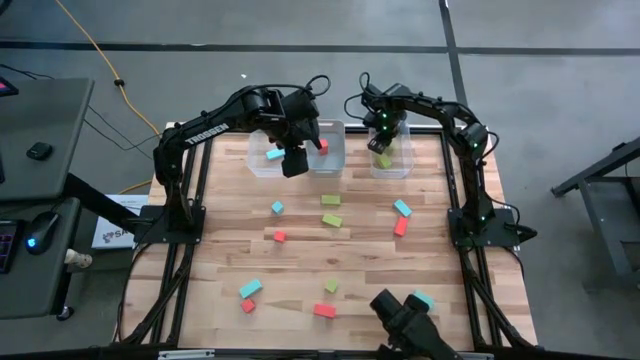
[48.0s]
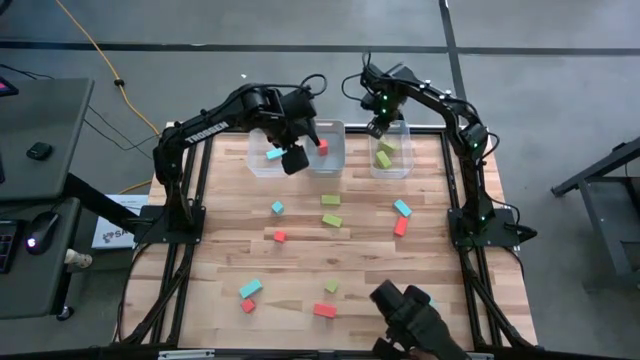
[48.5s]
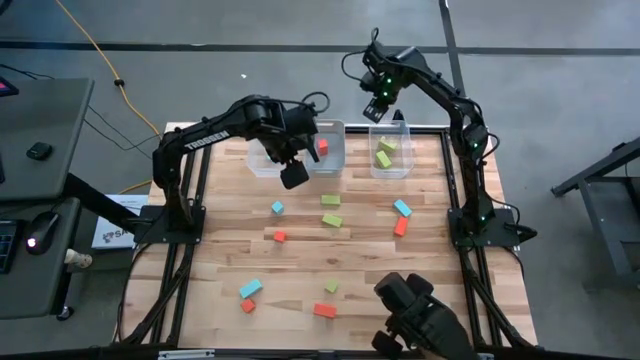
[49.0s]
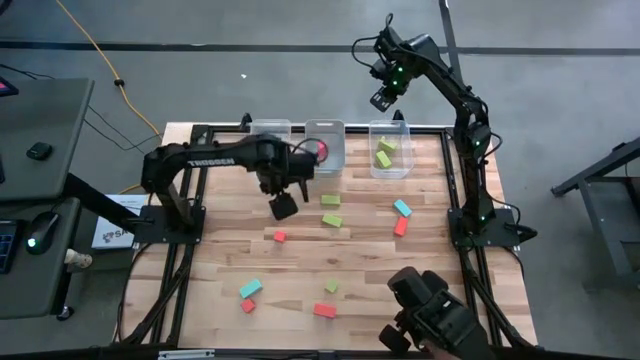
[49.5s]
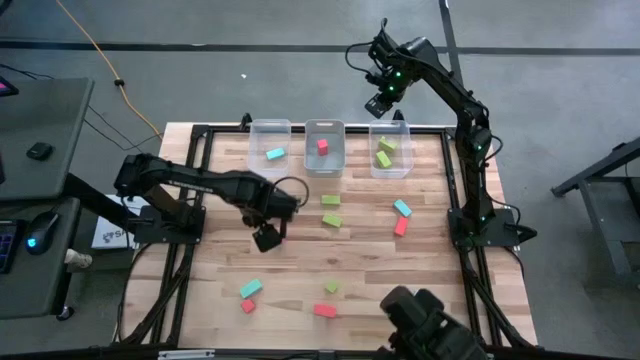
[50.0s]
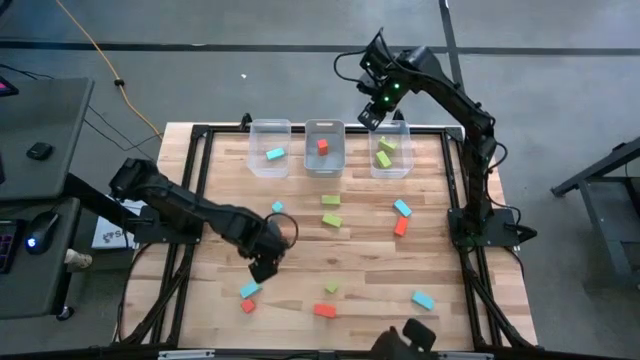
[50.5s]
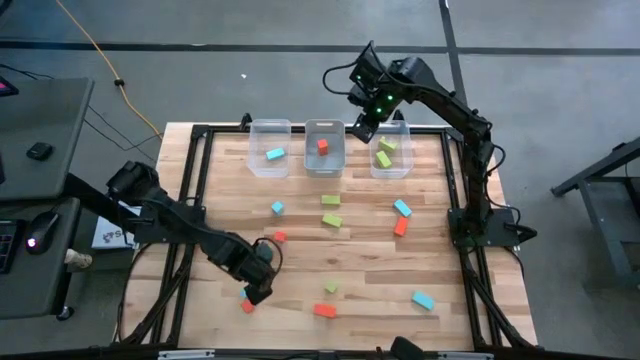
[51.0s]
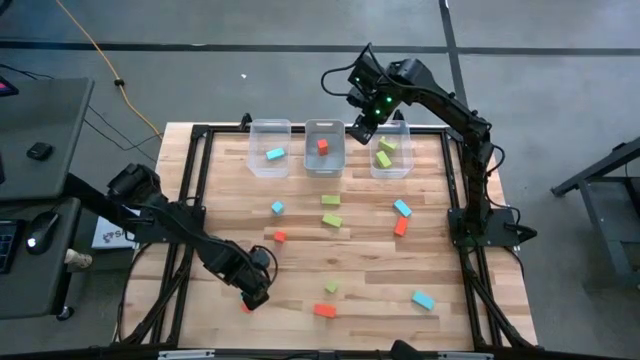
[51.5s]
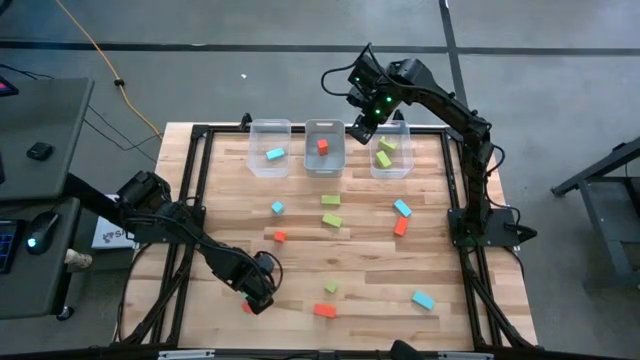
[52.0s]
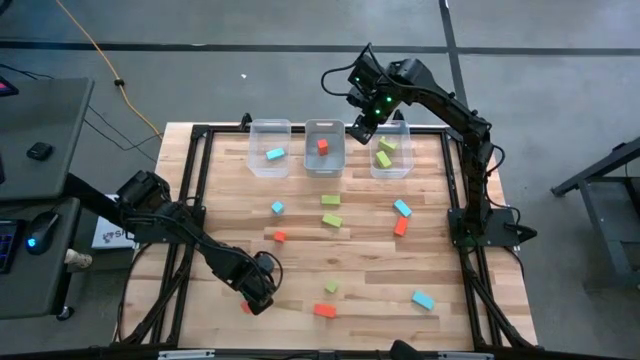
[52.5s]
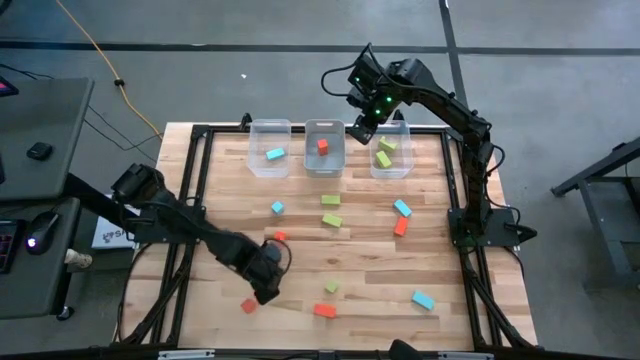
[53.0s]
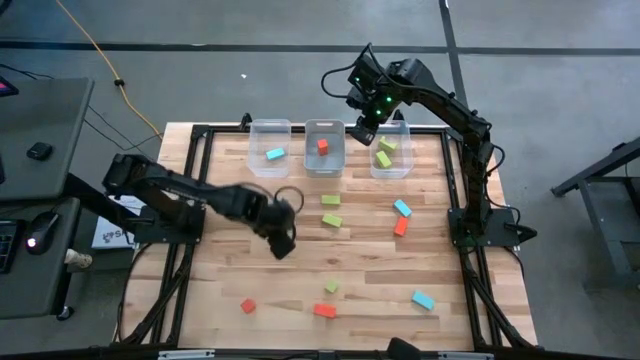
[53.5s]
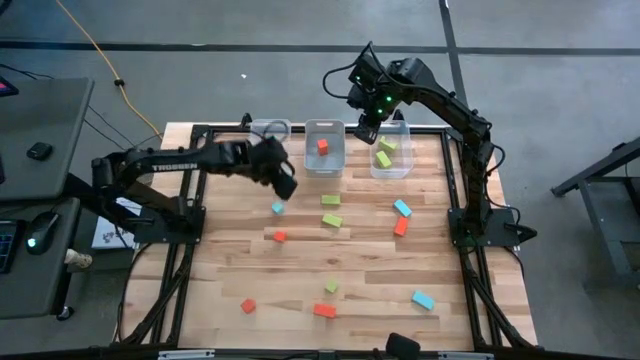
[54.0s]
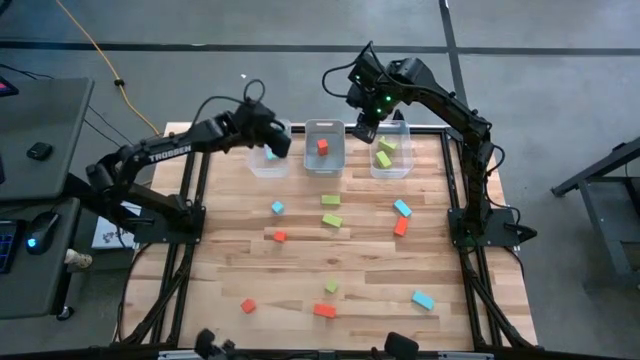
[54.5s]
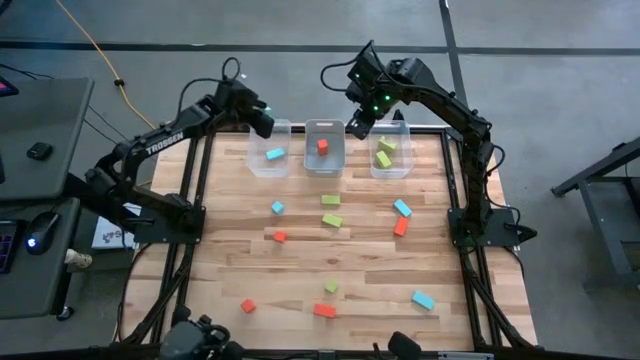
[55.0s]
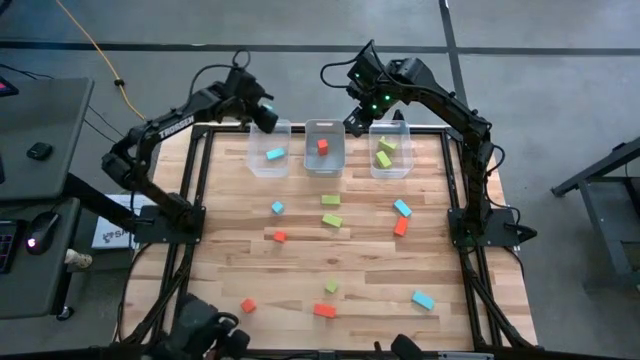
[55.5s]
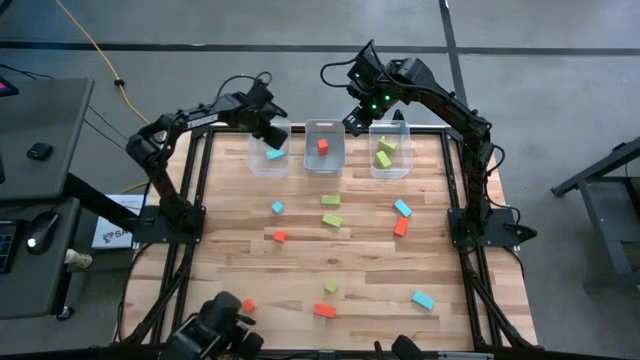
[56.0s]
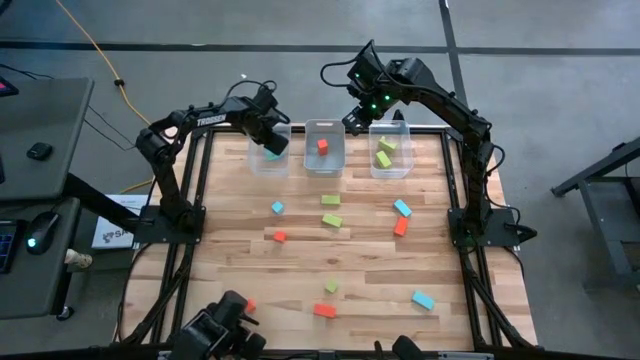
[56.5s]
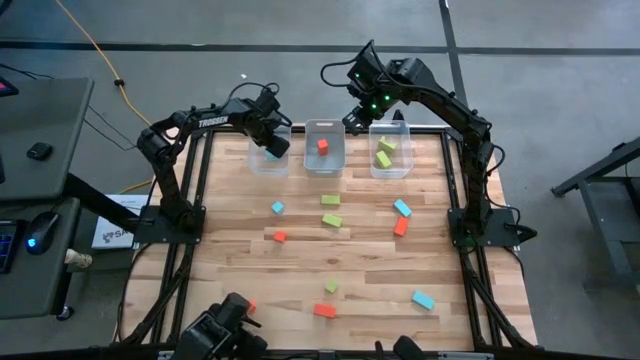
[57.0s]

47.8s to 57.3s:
Task: Sort & place blocks by color
Put the large blue rectangular block into the left transparent bin

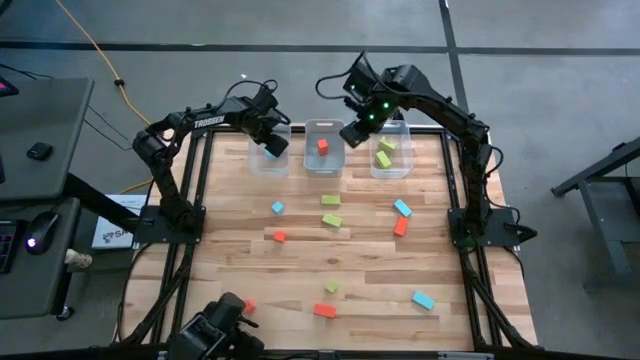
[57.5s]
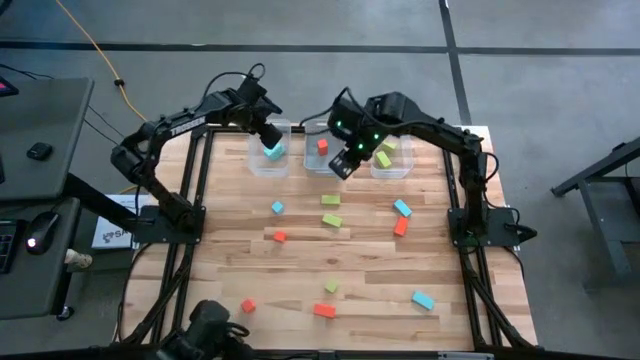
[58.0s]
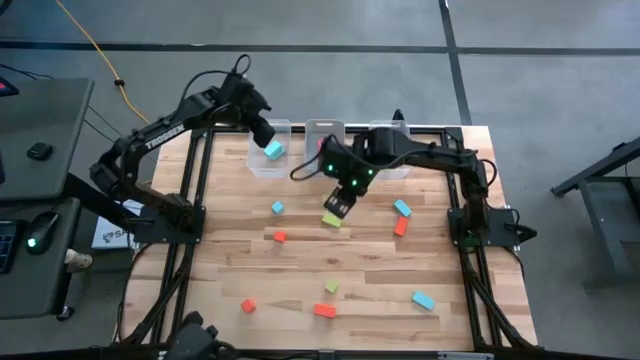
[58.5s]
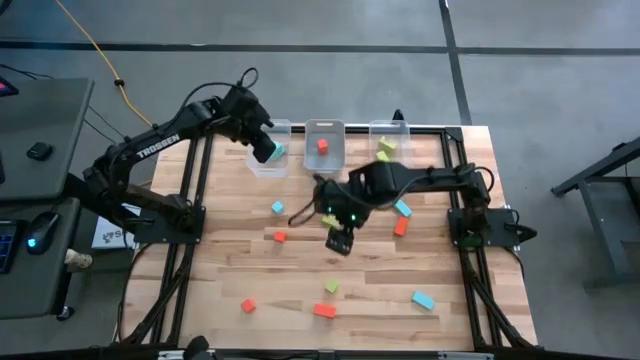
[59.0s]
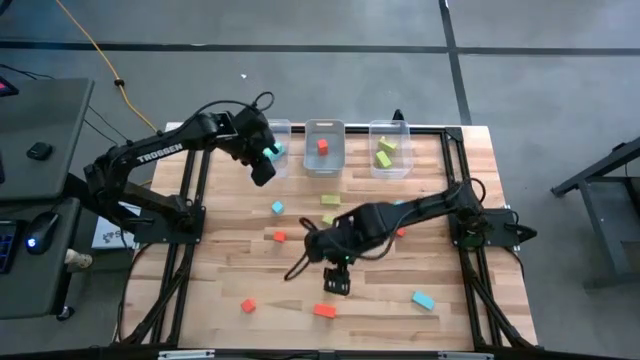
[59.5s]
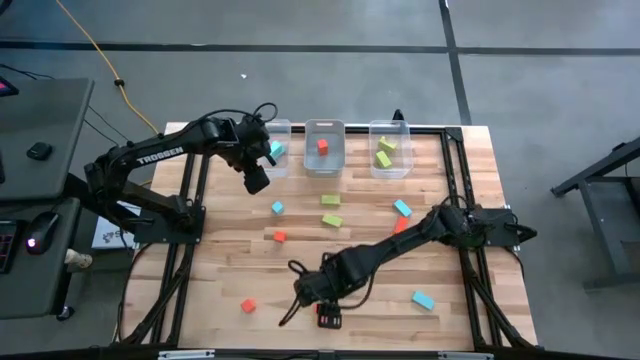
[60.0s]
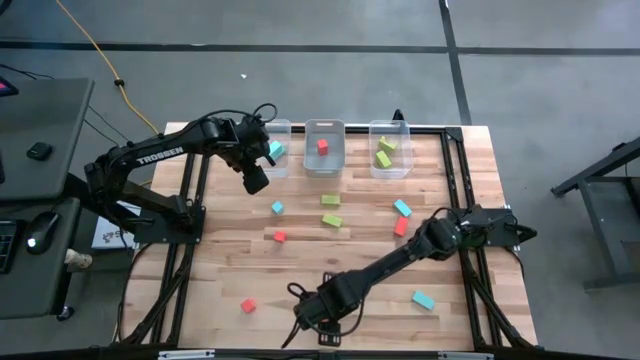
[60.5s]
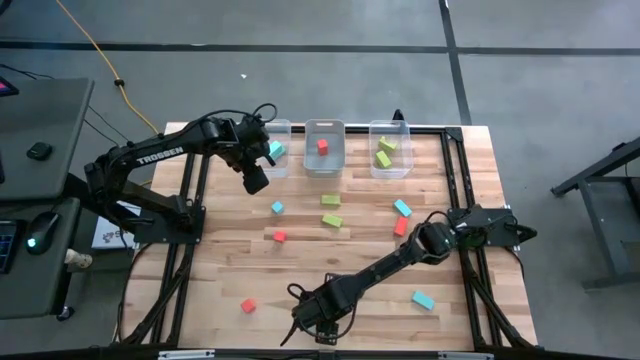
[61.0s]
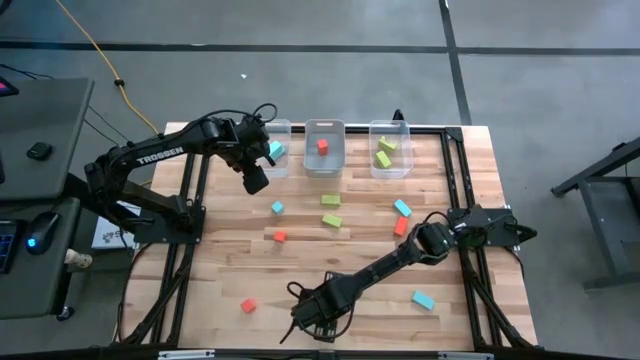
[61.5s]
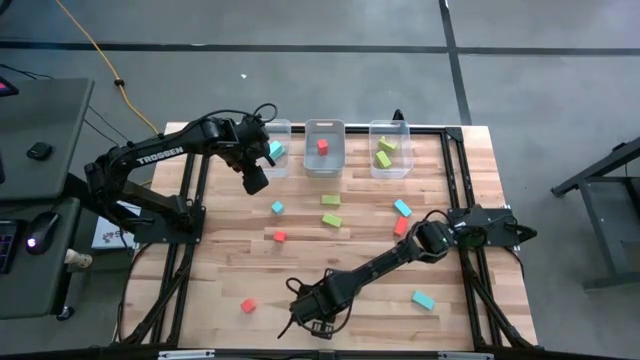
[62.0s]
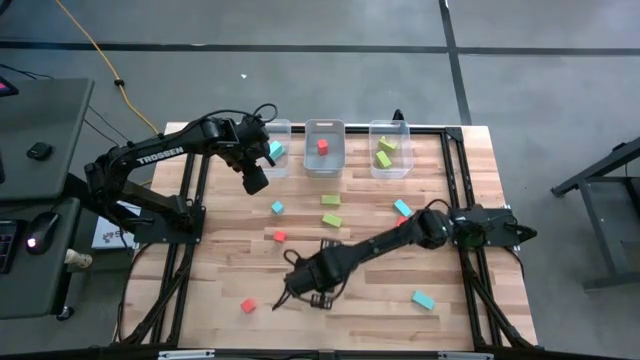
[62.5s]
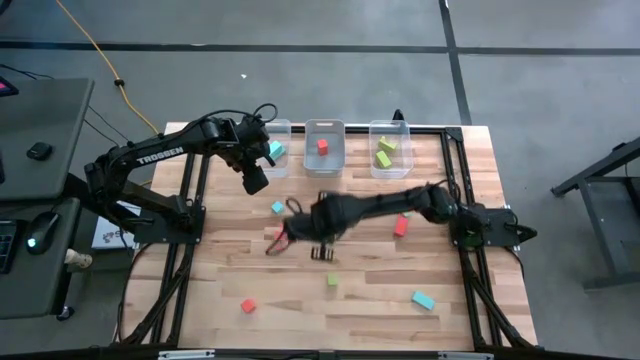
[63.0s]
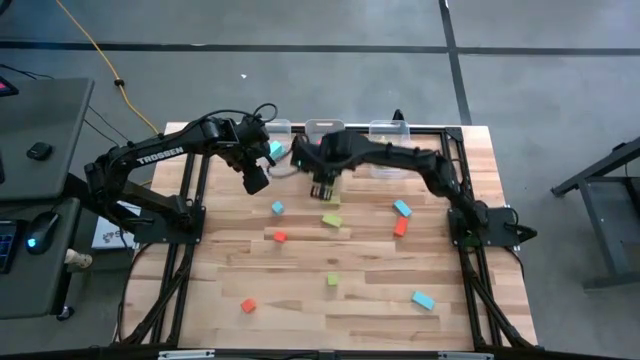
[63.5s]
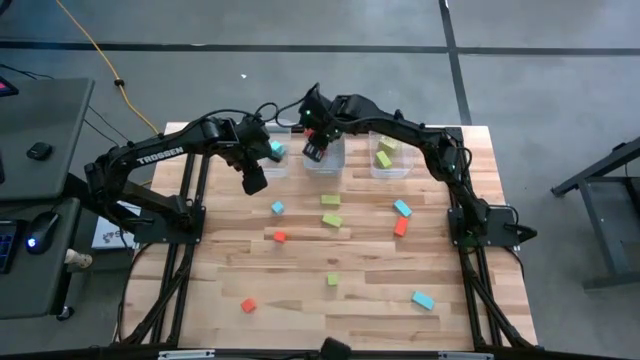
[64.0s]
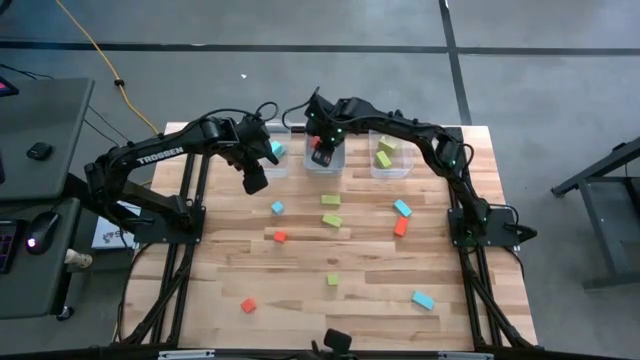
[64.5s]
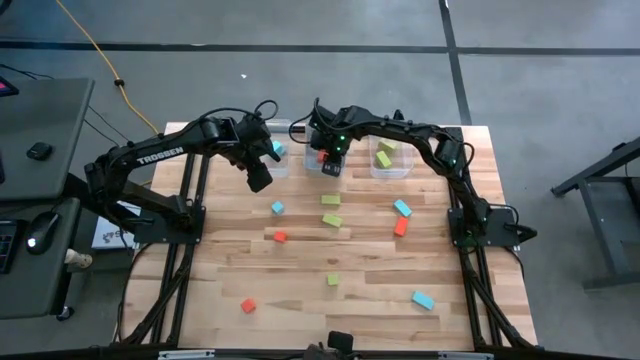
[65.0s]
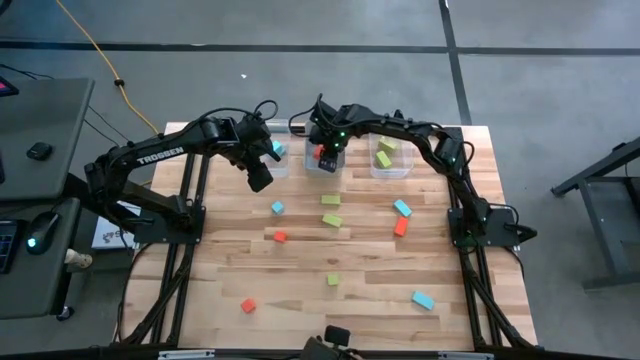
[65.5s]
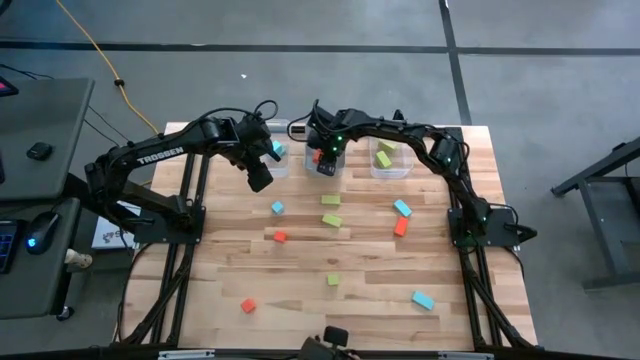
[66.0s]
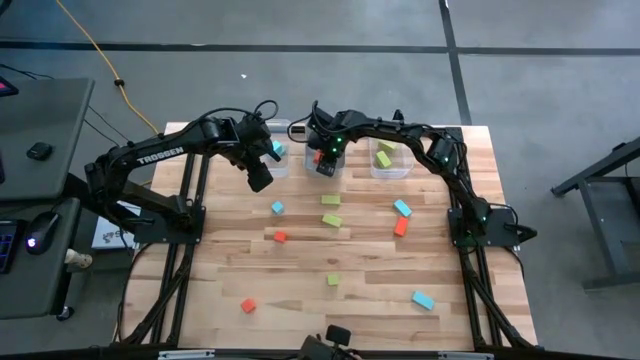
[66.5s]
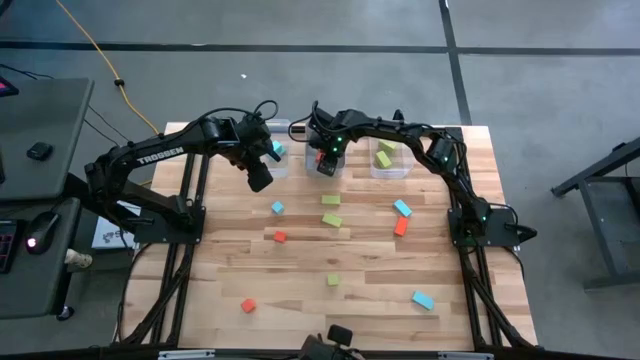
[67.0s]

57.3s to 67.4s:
Put the large orange rectangular block into the gray bin

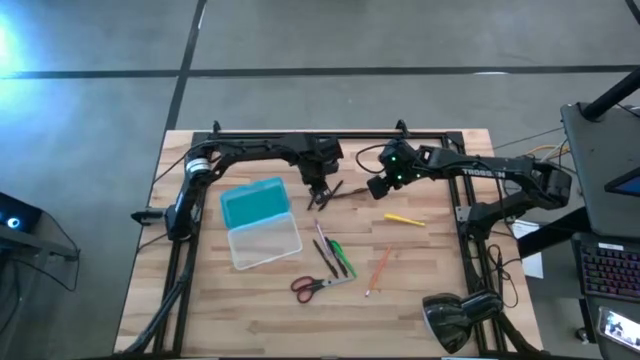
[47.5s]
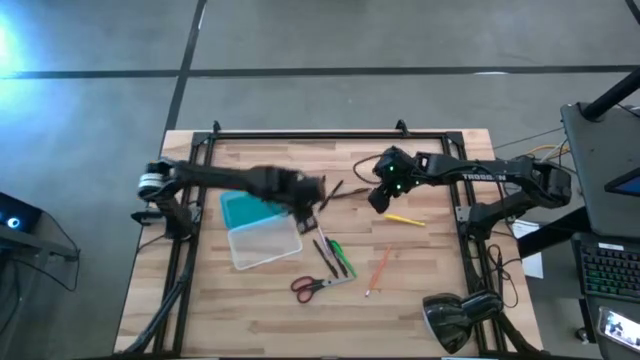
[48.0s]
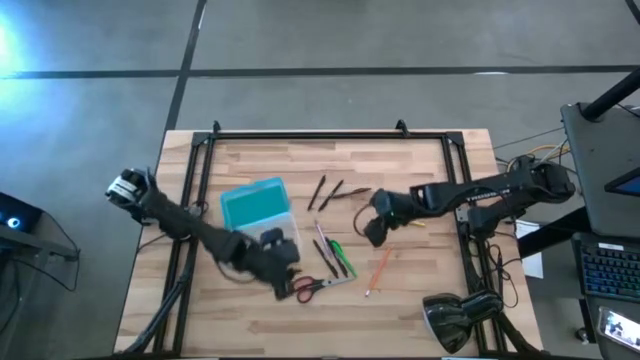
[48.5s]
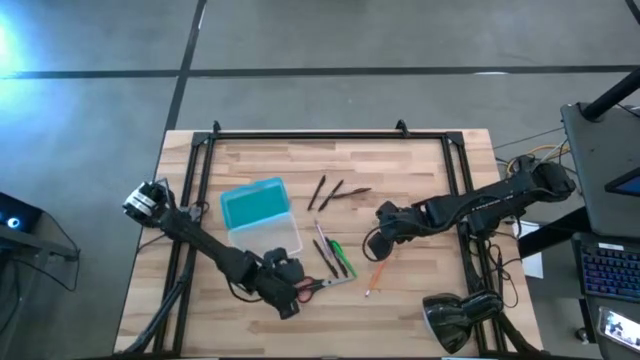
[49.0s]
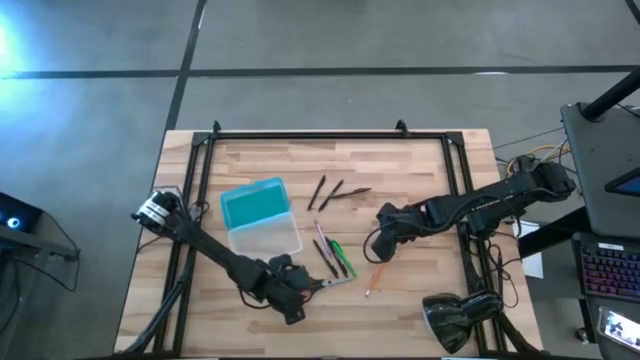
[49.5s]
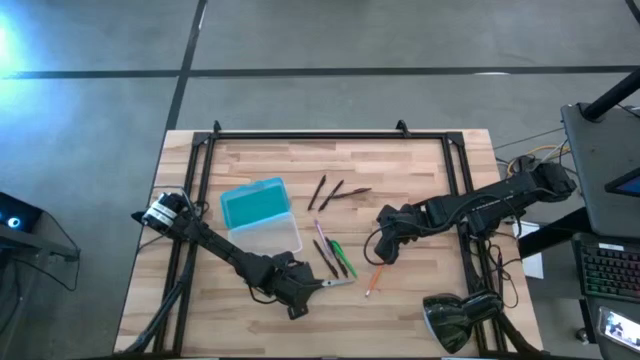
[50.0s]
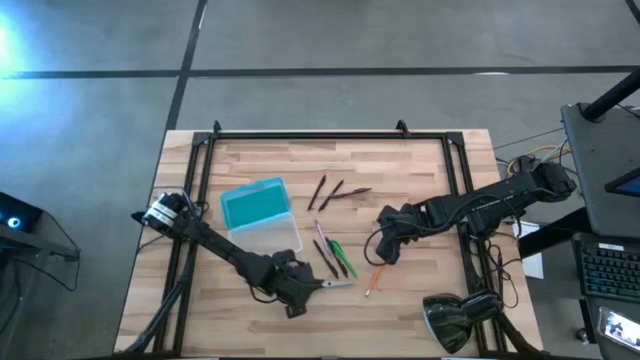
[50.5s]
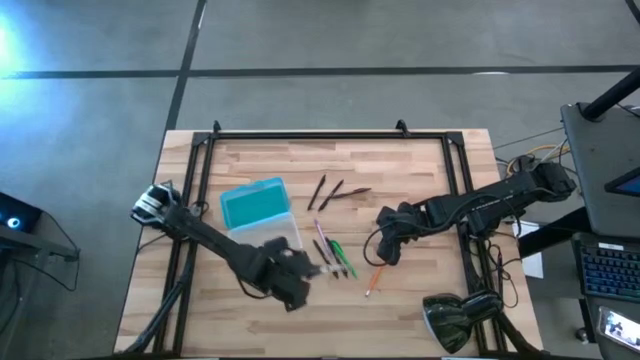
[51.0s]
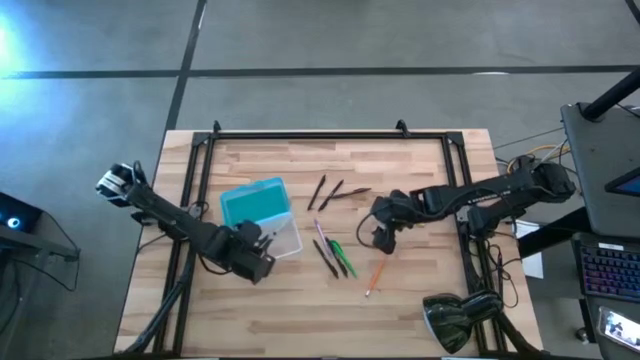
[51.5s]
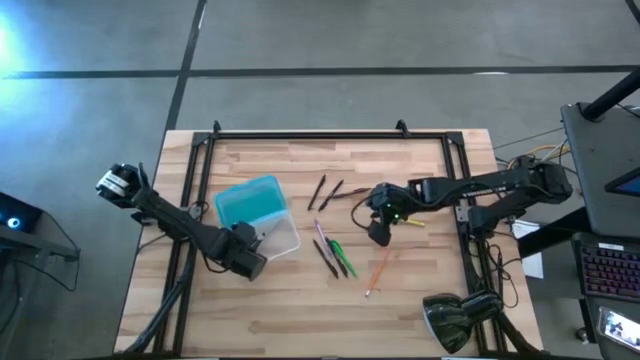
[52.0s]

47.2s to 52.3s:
Task: Pick & place school supplies into a supply box
Put the black scissors into the blue supply box
